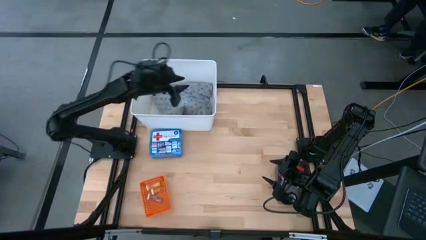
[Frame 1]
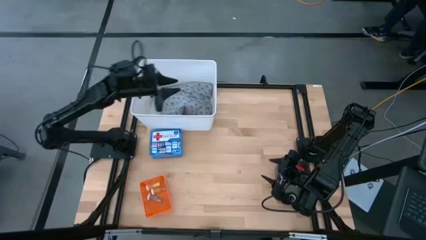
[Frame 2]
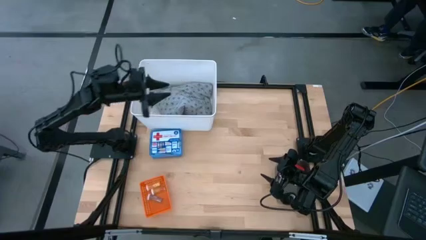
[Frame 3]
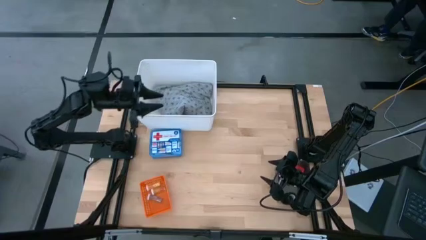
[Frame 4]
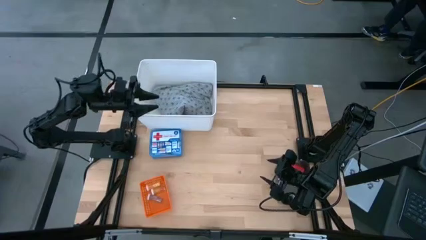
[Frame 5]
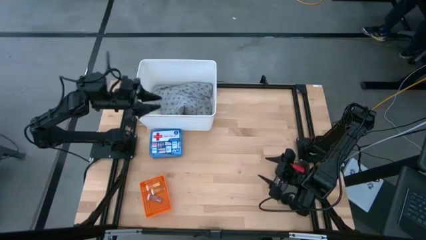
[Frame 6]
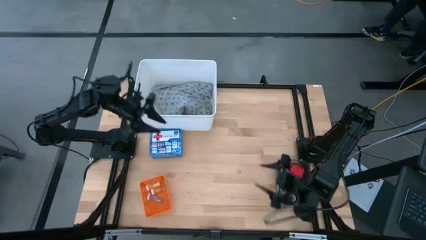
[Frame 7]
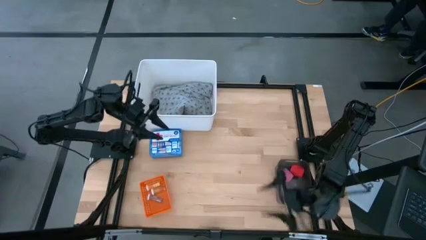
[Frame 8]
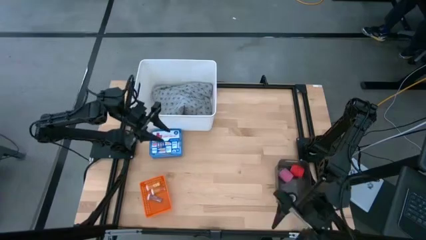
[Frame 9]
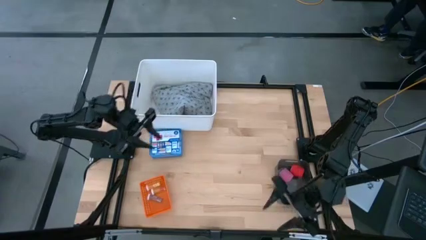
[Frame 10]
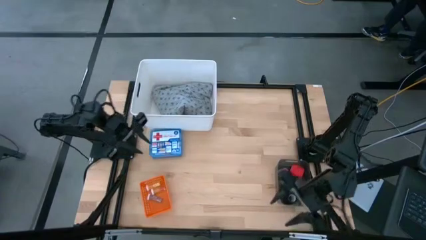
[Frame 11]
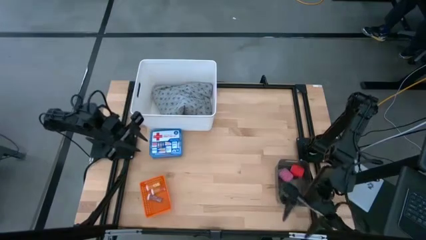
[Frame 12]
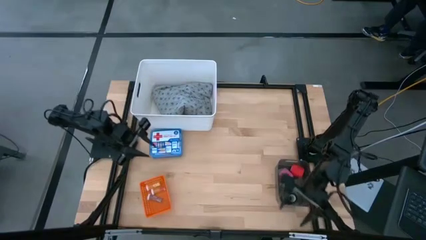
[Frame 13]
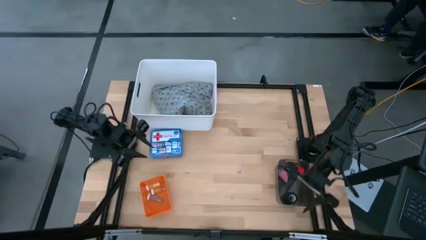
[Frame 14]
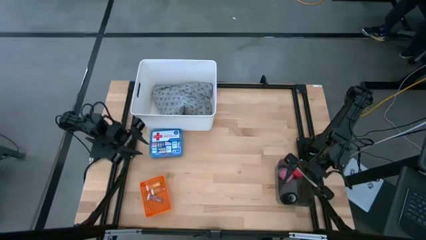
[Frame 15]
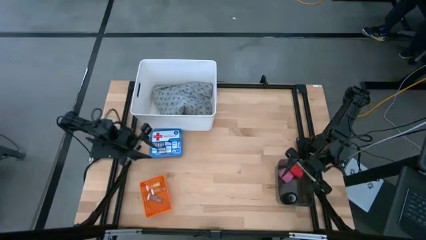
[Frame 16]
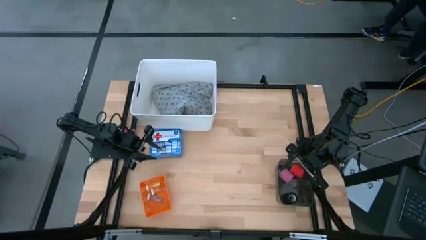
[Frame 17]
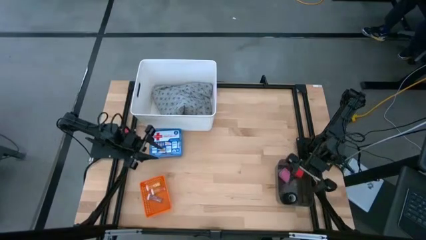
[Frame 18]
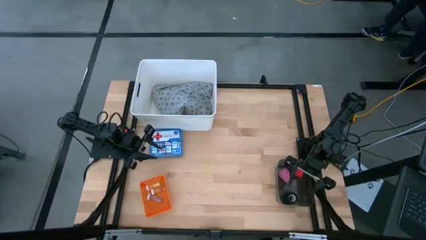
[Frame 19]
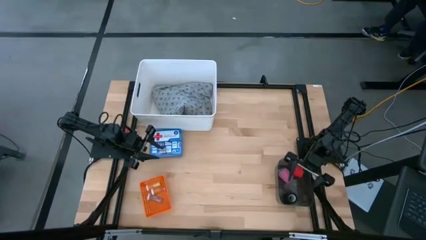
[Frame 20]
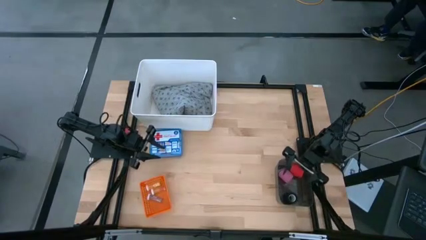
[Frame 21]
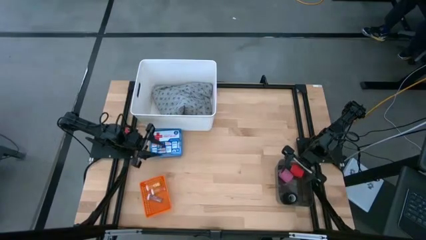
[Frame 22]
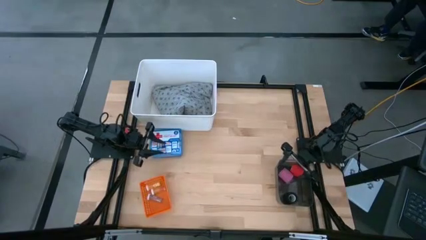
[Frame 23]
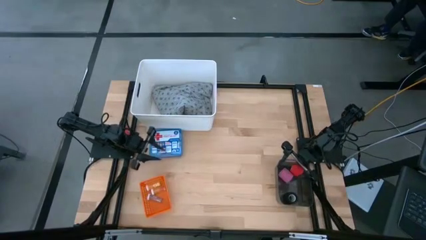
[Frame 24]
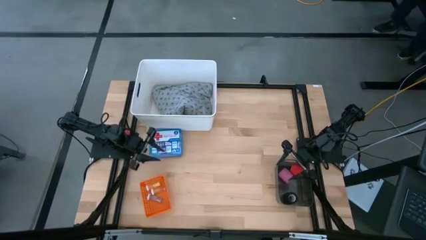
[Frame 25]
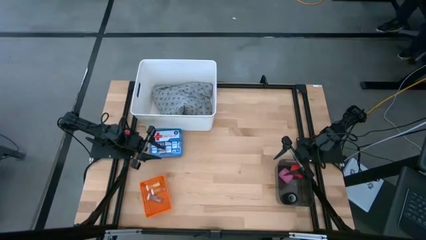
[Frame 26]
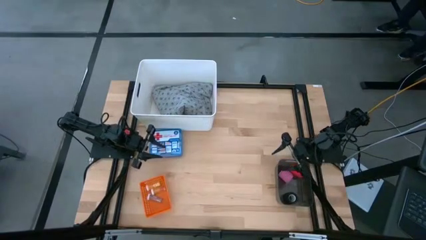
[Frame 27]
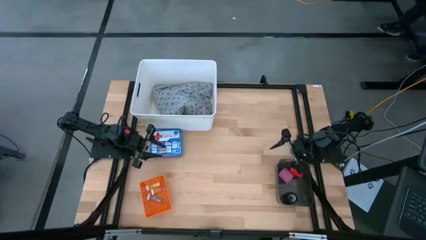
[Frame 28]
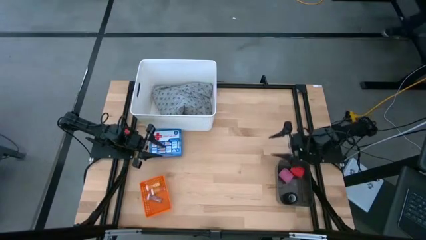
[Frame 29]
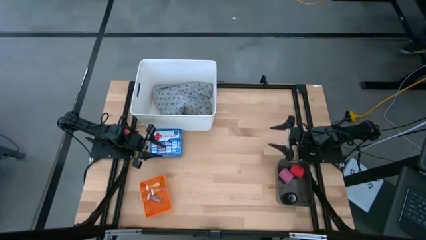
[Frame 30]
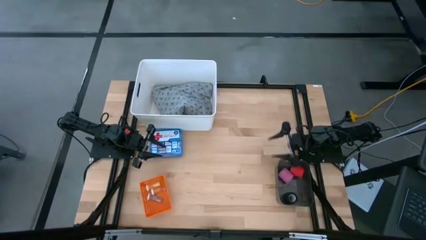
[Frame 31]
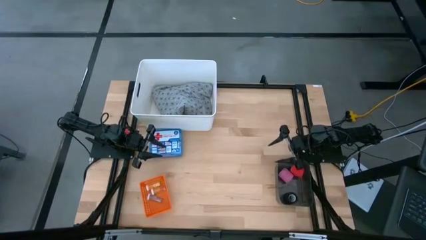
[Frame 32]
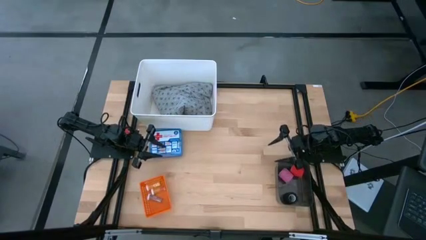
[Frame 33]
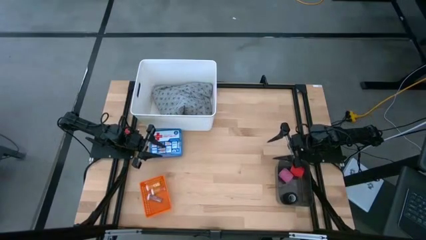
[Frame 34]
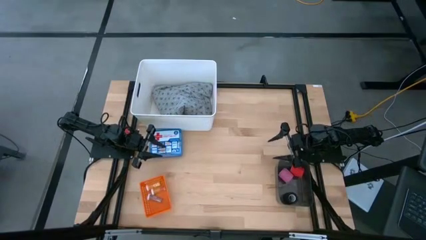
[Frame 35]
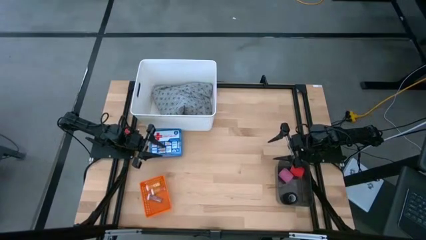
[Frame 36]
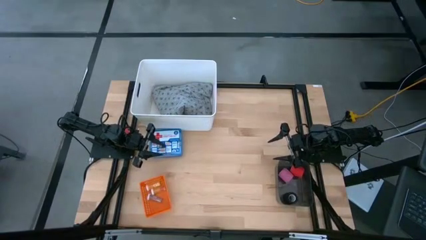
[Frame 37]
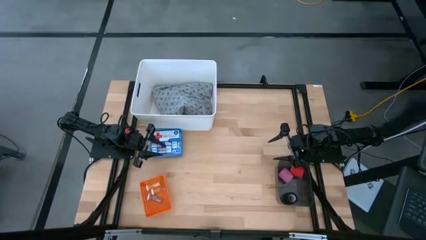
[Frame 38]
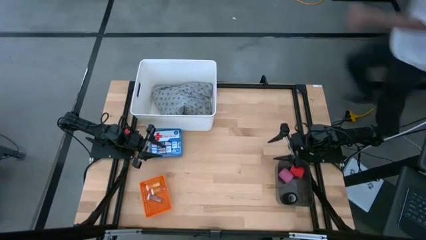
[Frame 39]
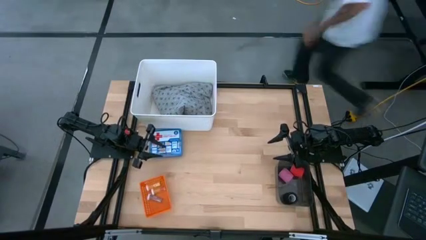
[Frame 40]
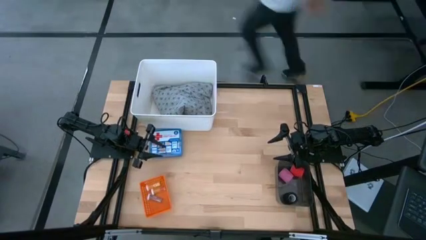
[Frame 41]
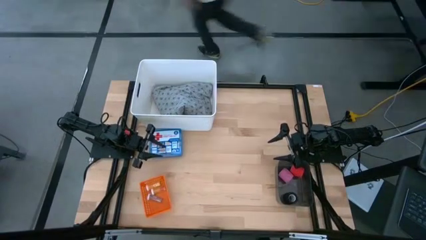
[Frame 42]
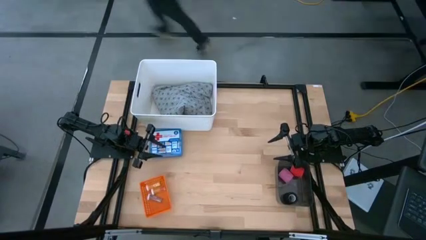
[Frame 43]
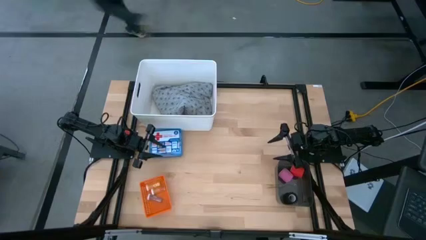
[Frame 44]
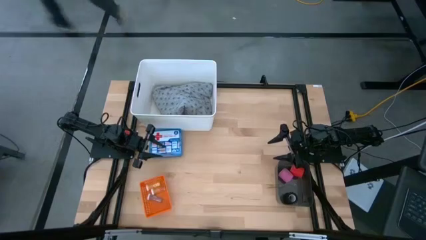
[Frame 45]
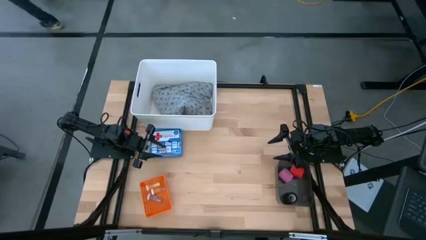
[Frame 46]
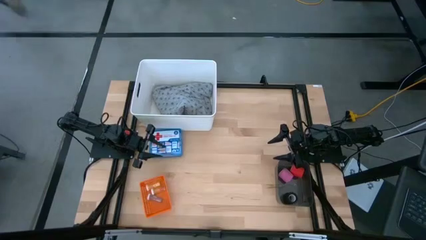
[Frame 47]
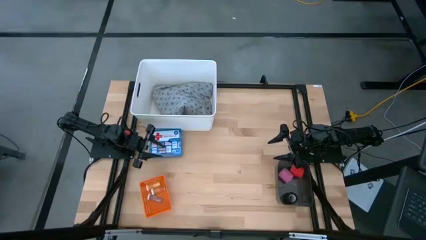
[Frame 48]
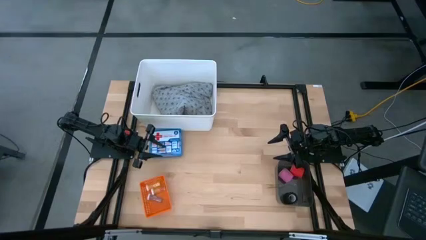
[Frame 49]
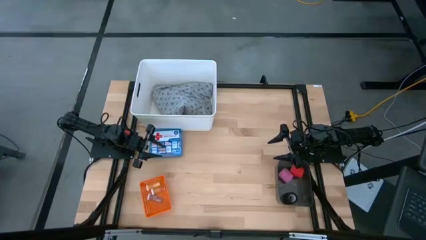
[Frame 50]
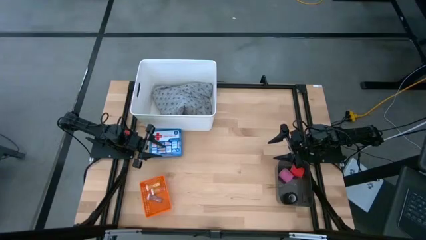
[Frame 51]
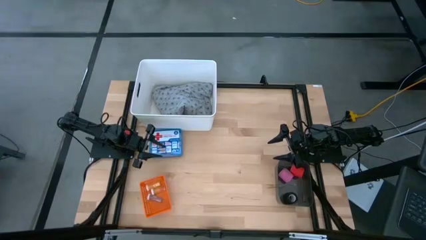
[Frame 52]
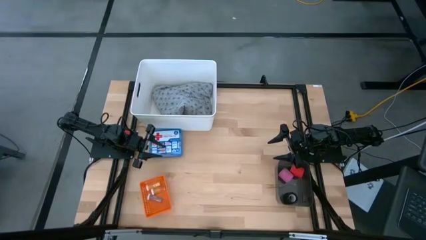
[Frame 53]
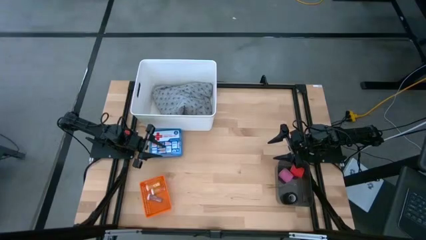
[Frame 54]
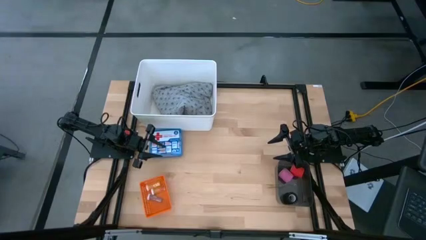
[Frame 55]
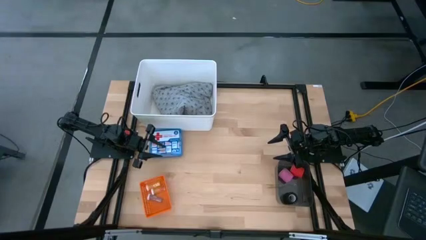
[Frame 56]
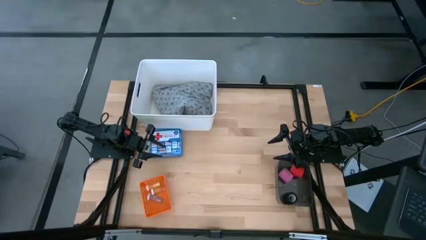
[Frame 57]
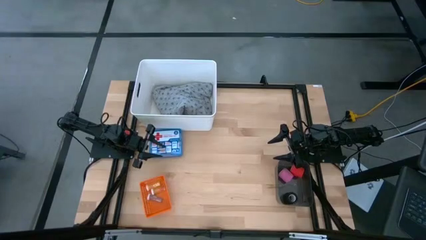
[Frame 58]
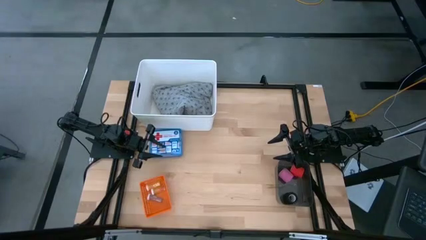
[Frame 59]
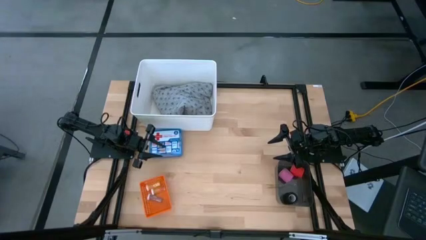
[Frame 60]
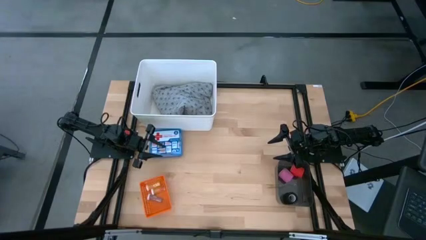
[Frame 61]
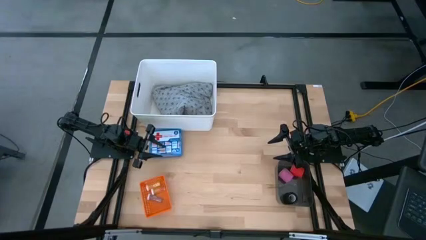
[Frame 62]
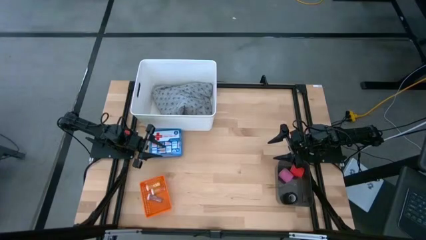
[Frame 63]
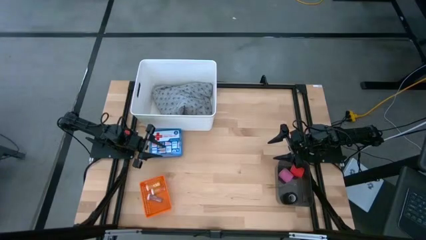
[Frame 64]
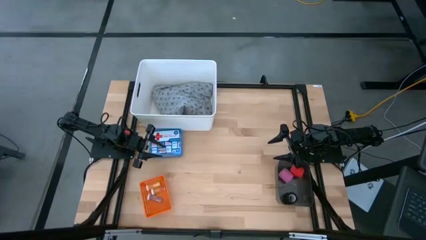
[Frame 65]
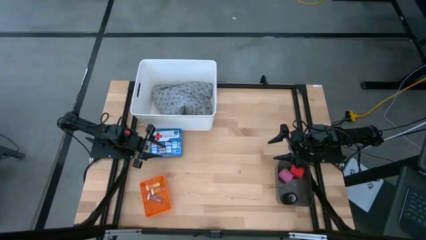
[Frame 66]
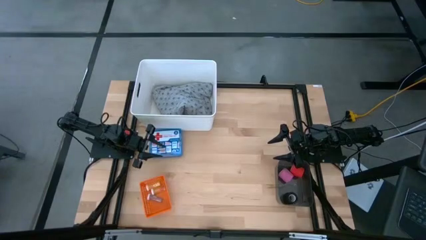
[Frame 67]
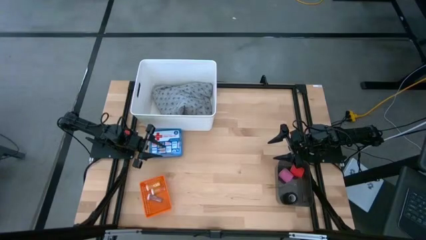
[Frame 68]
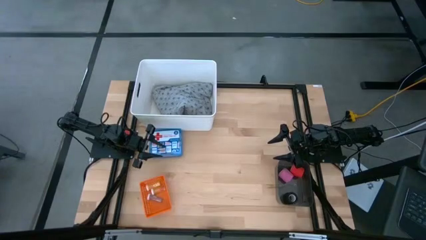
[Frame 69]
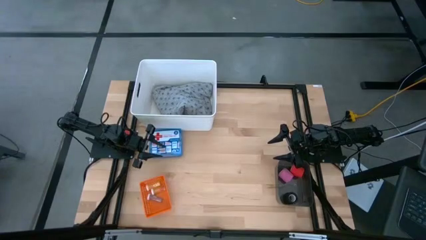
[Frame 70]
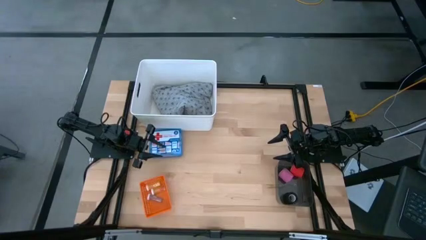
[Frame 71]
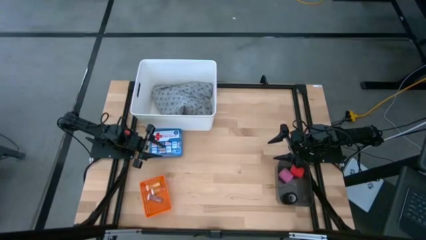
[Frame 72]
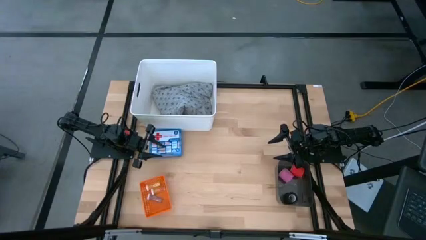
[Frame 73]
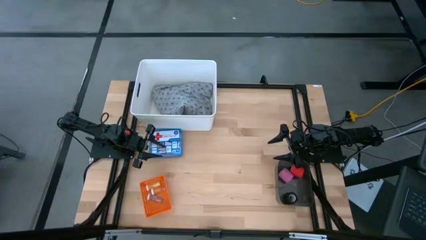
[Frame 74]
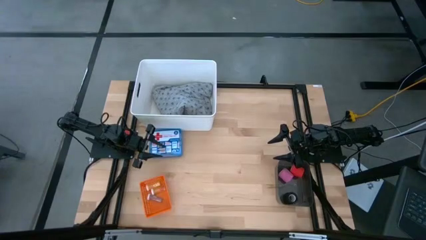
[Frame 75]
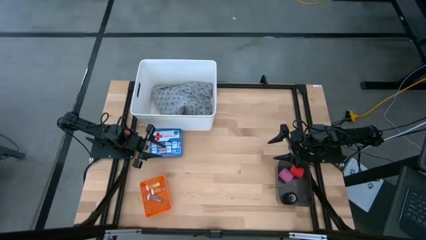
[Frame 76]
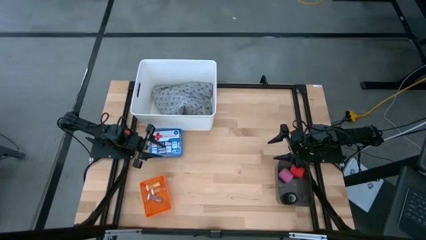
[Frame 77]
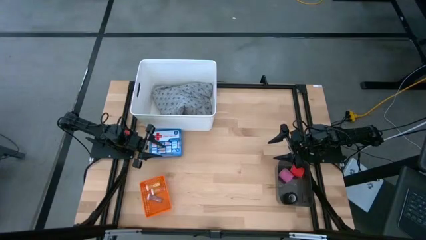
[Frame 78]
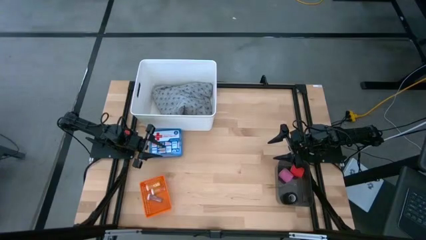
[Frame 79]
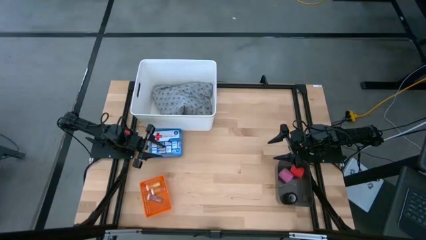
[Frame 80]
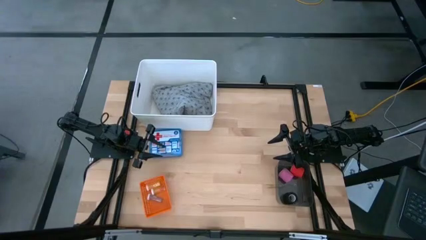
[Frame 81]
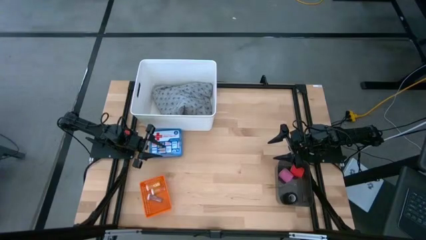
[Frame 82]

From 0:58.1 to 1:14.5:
Task: Pick & place medical supplies in basket/bin
Return to Home Position
